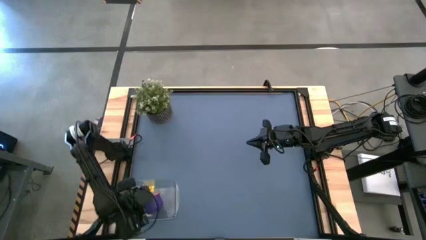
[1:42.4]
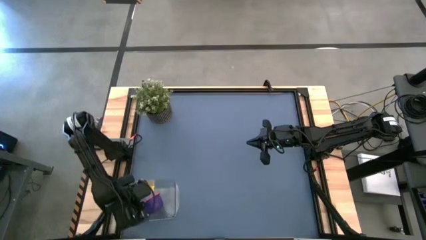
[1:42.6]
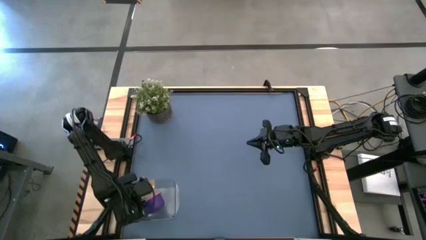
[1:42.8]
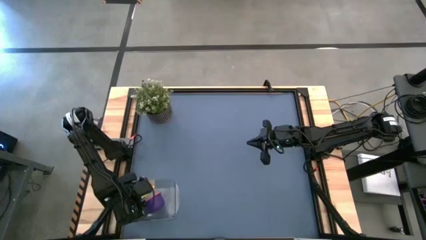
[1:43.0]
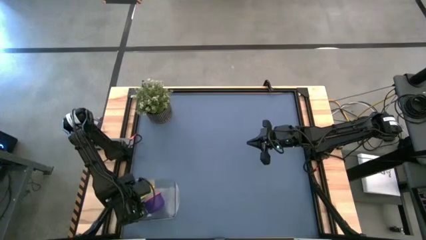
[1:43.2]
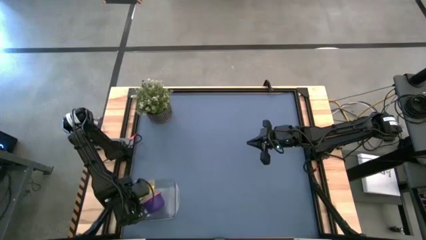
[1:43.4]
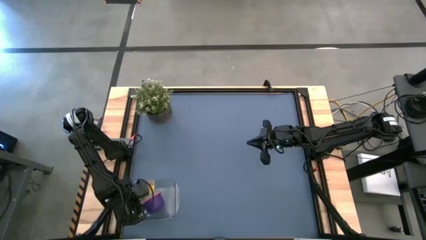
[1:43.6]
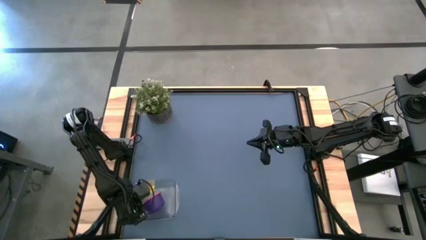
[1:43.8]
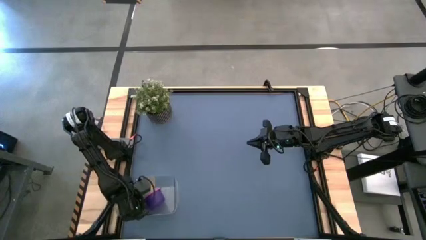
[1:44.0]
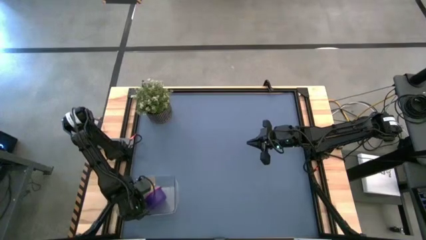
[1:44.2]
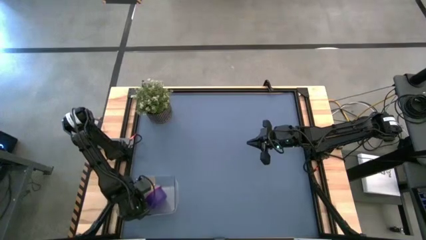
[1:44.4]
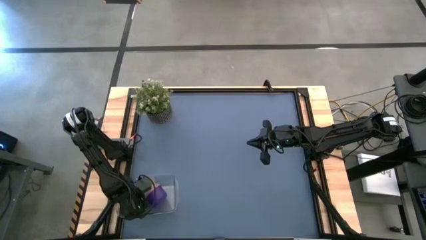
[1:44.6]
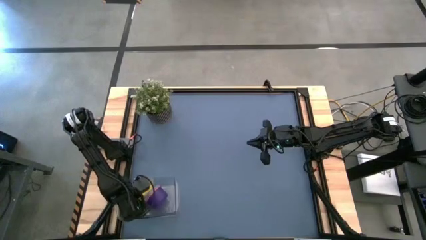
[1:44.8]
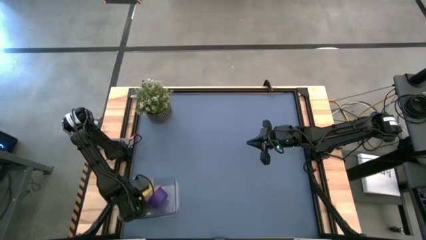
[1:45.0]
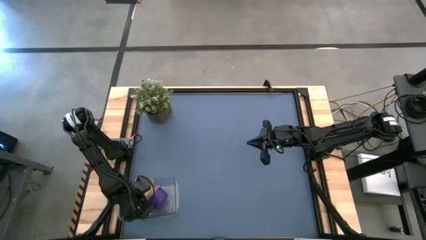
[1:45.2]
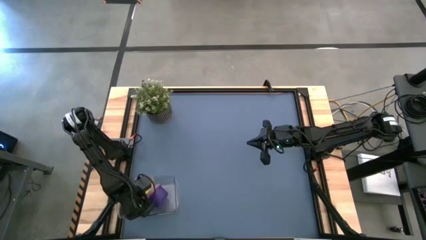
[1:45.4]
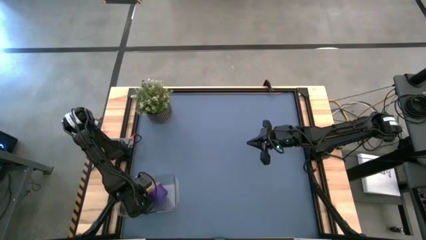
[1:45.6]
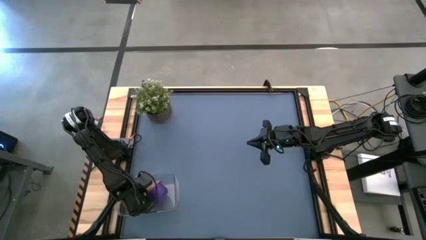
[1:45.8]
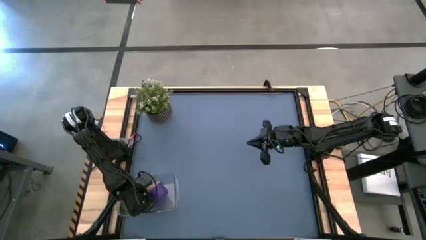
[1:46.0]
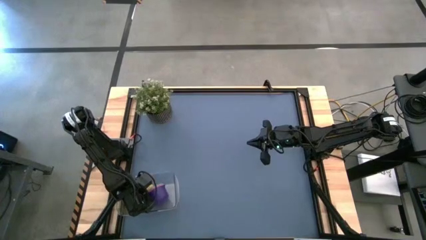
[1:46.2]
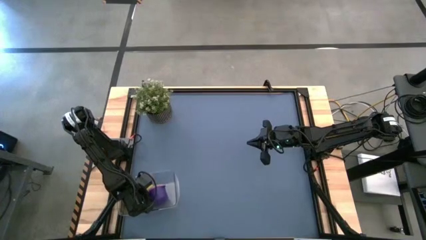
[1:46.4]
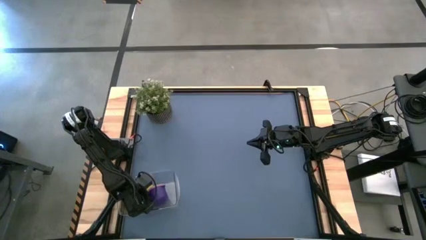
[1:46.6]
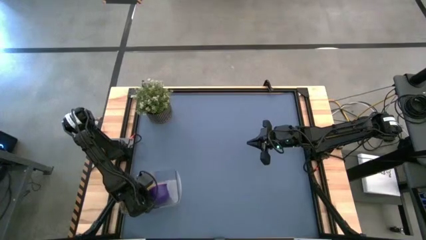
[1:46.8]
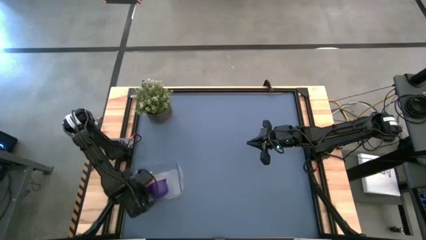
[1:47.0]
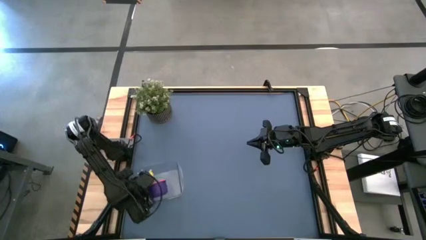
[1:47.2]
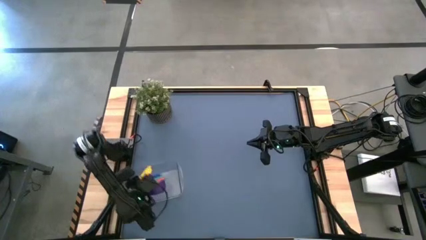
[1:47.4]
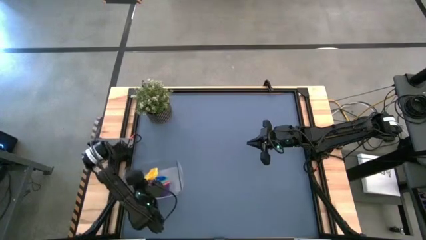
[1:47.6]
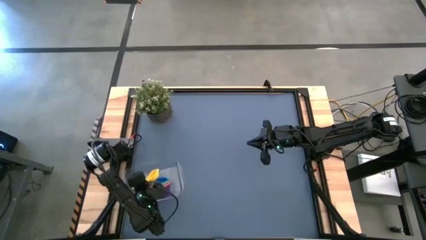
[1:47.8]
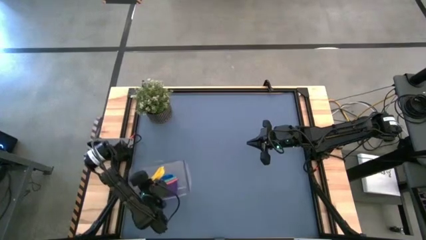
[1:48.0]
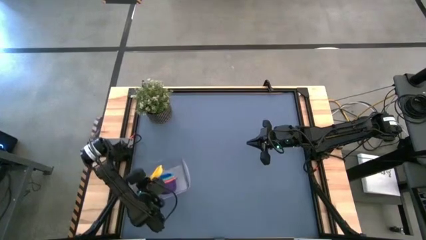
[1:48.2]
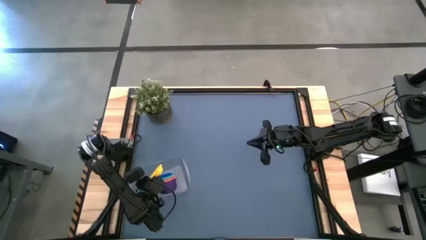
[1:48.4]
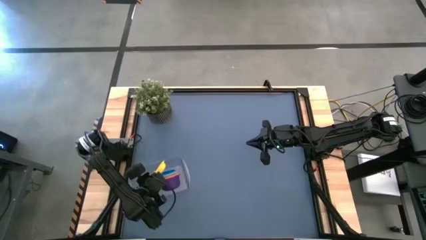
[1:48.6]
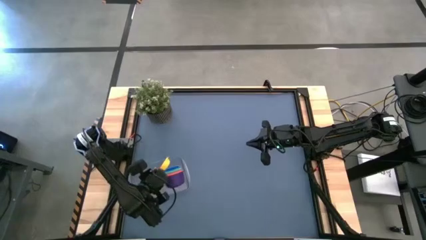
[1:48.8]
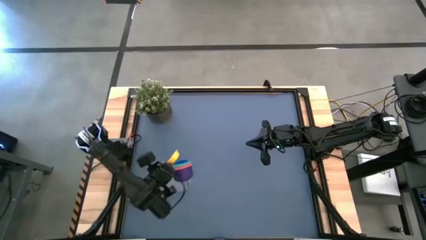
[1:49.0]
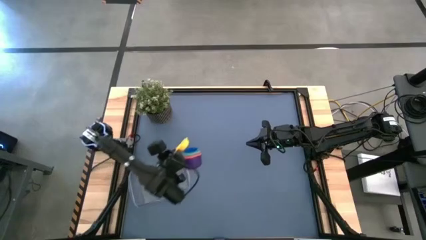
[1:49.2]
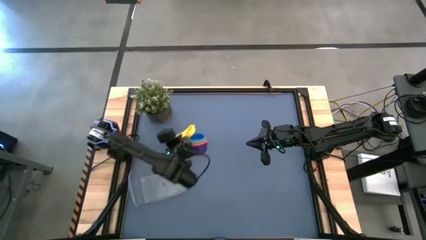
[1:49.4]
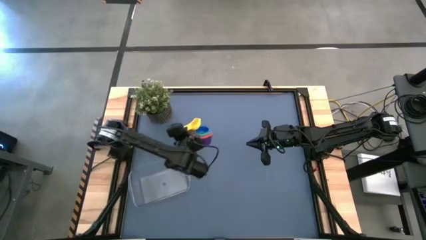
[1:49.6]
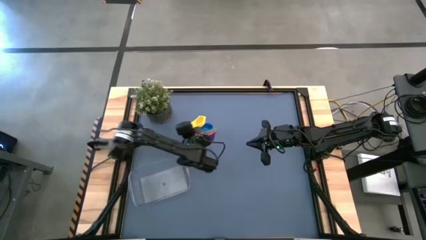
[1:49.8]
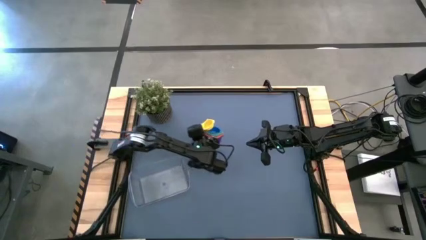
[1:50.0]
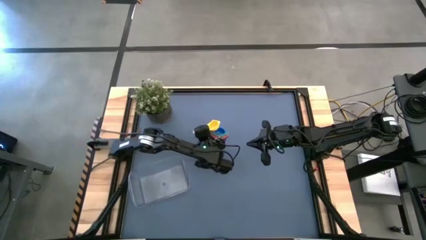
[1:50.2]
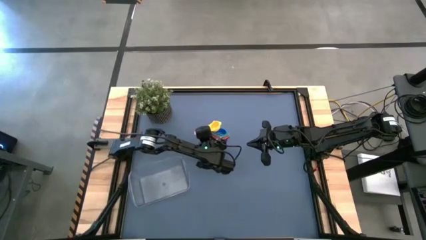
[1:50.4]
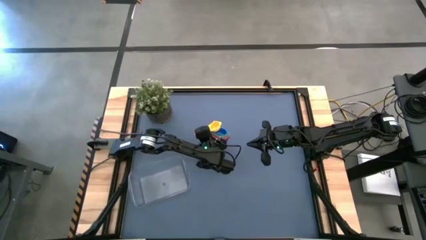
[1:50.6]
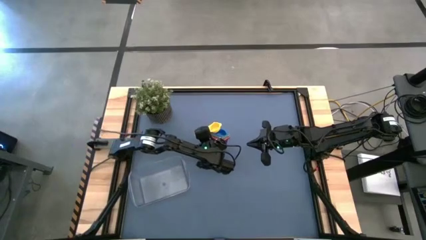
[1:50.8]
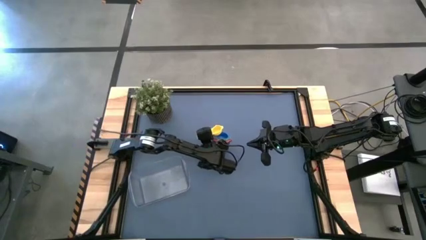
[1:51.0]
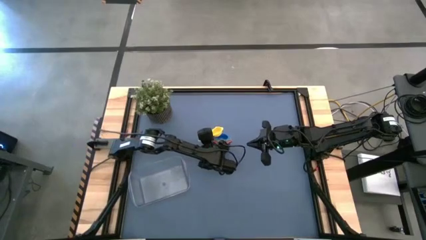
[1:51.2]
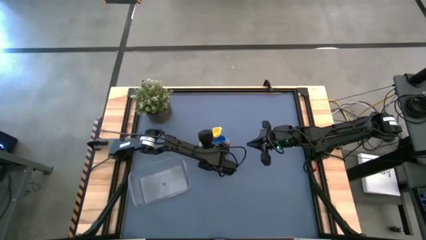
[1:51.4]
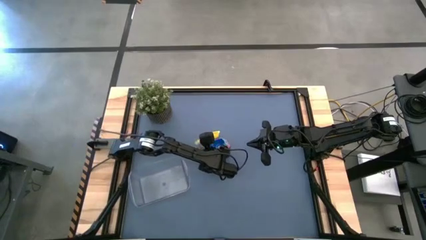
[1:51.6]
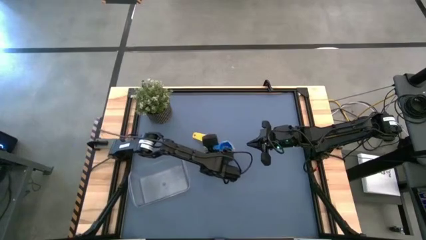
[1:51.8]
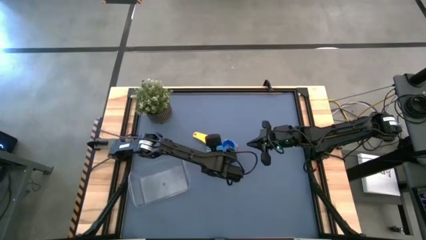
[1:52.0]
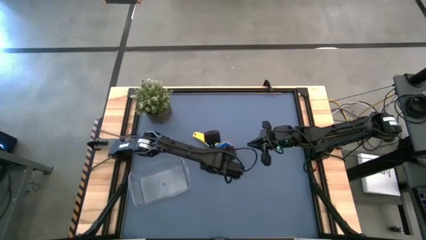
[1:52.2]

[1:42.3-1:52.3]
Task: Nest measuring cups in basket
Put the stacked measuring cups into the transparent bin

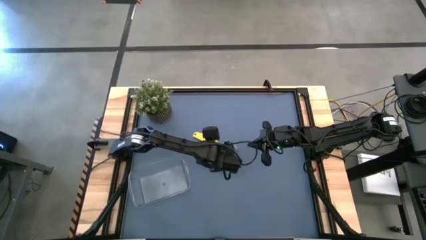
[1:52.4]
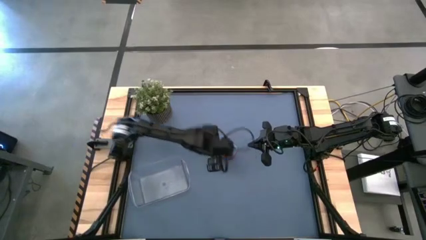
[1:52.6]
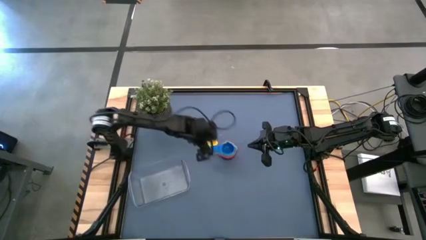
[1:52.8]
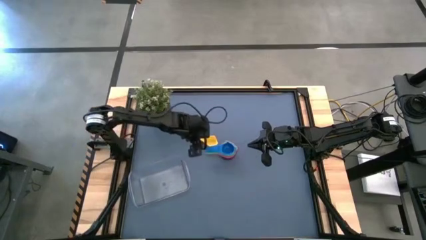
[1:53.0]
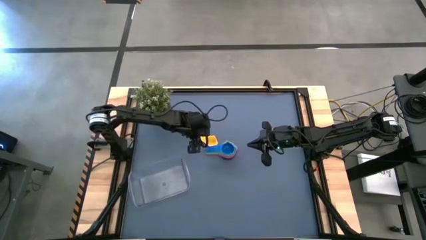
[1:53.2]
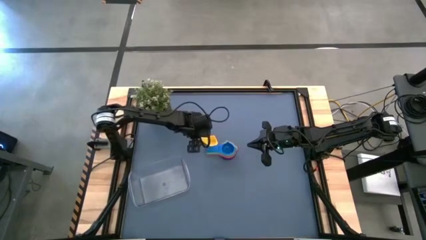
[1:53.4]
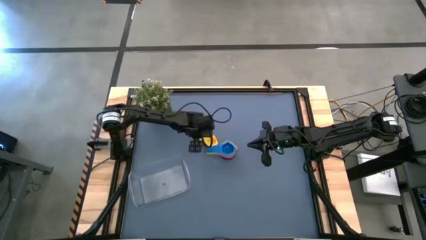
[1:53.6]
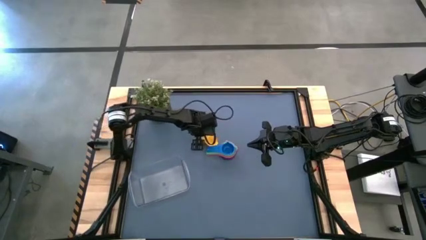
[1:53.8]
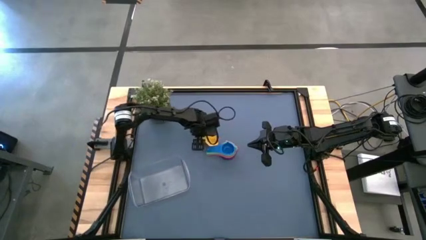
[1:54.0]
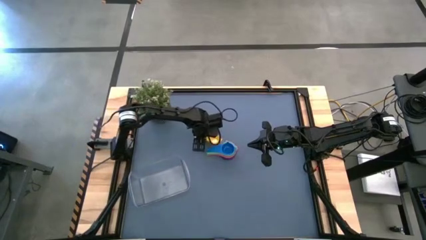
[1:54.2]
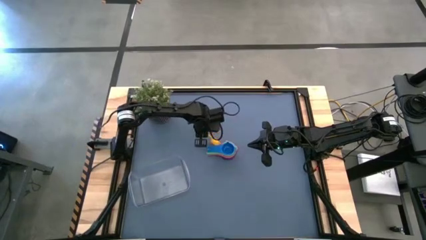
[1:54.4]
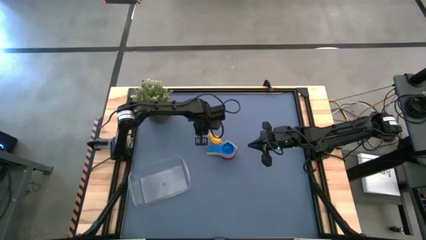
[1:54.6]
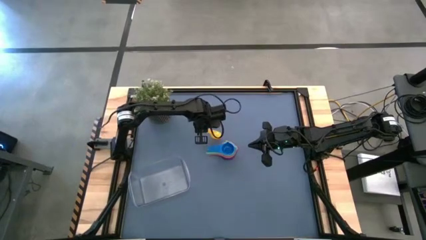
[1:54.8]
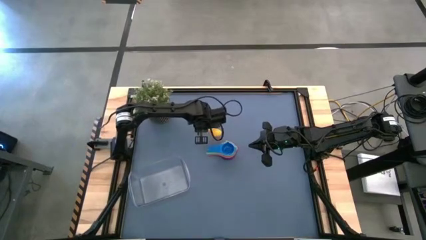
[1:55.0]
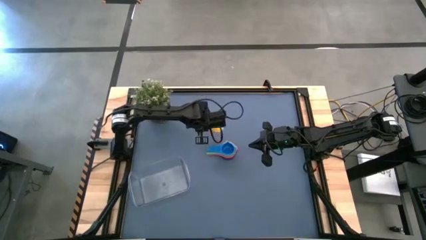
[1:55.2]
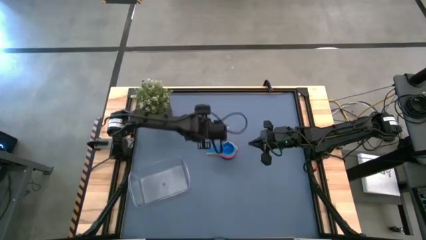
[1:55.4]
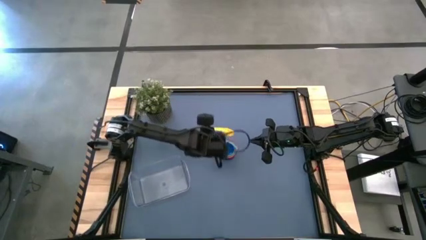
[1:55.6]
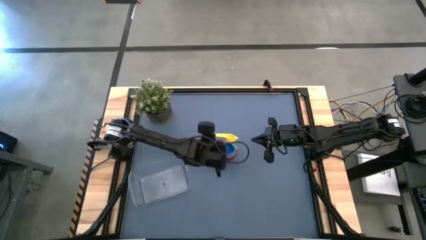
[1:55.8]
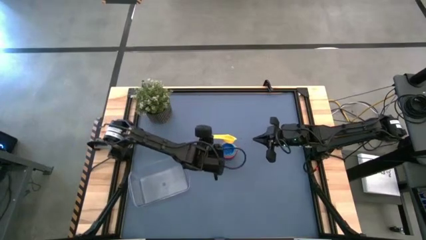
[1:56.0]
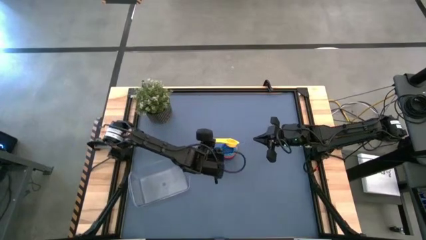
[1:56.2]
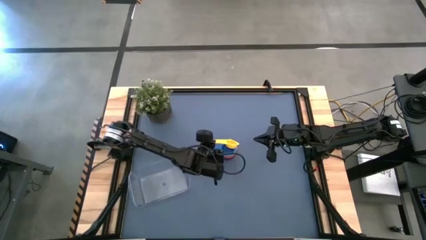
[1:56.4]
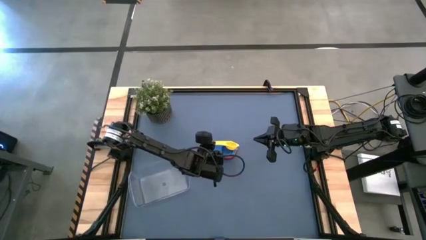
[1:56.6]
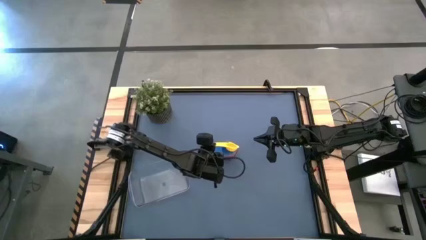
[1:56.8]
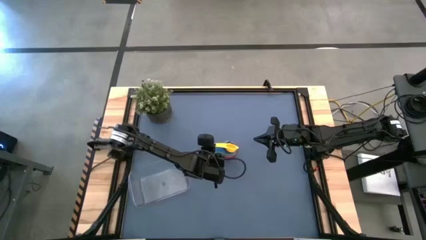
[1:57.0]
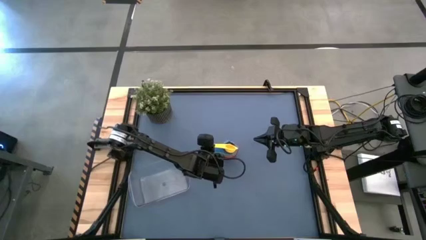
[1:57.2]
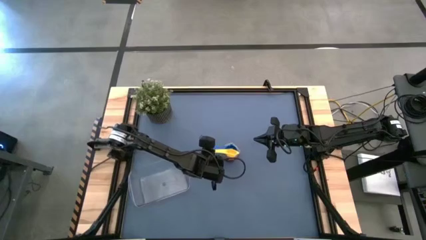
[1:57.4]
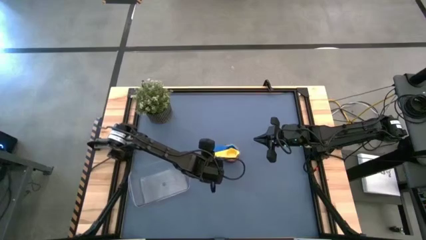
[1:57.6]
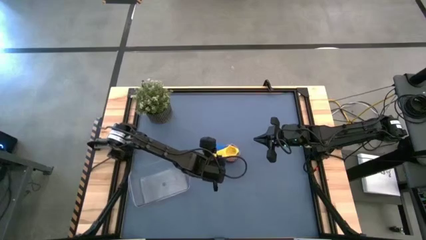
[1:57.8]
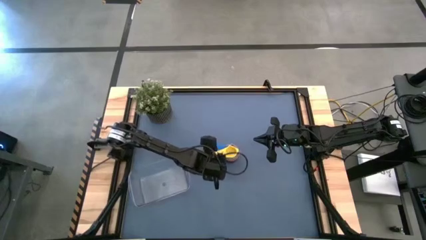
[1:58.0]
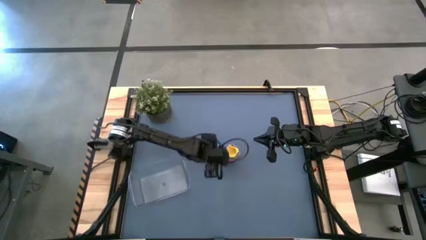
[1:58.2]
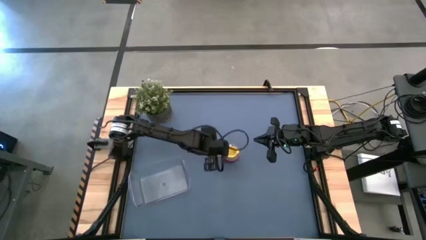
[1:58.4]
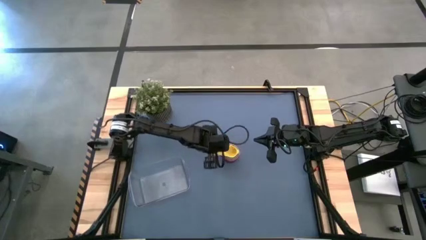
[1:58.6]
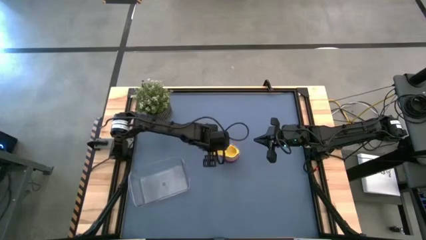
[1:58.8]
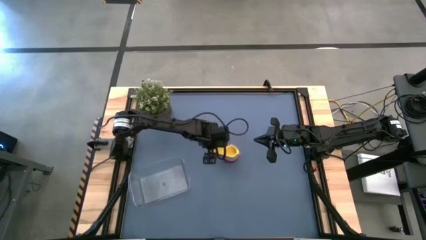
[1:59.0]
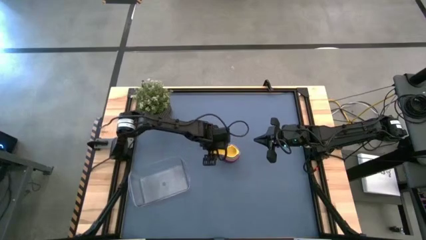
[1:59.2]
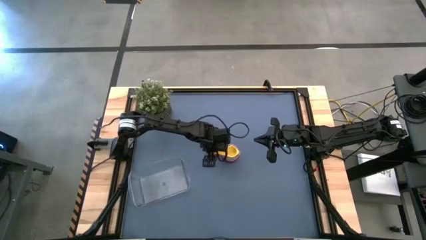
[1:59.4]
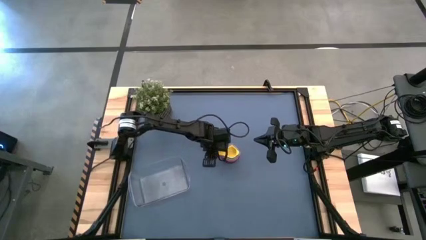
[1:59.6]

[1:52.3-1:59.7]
Stack the yellow measuring cup on top of the blue measuring cup
